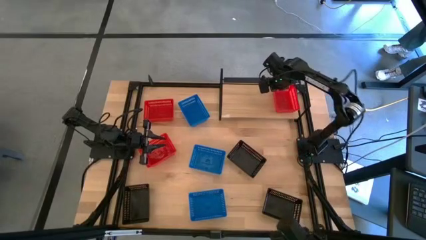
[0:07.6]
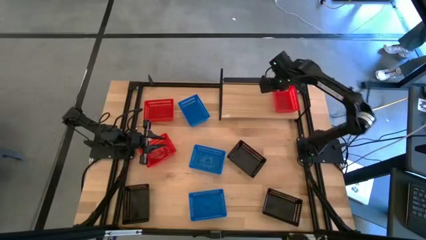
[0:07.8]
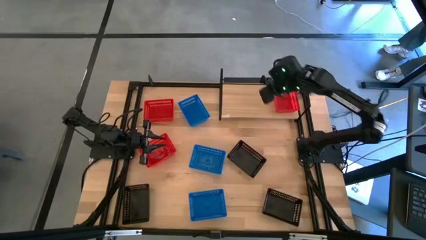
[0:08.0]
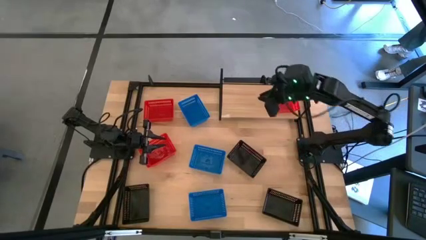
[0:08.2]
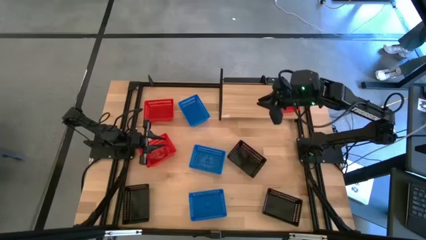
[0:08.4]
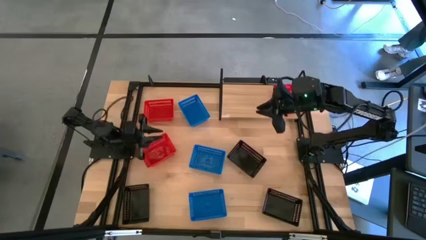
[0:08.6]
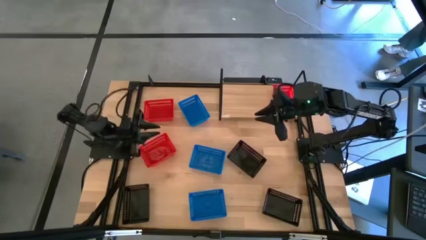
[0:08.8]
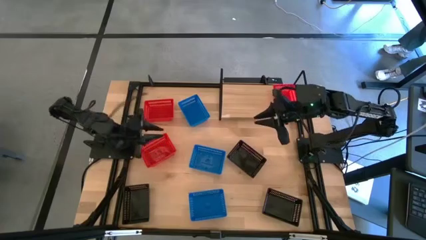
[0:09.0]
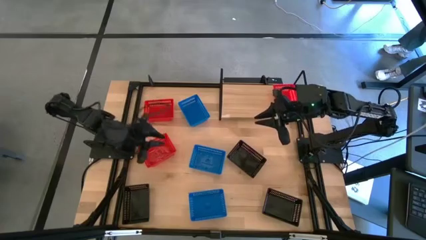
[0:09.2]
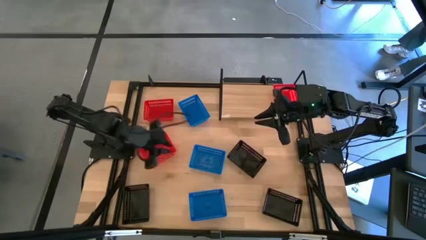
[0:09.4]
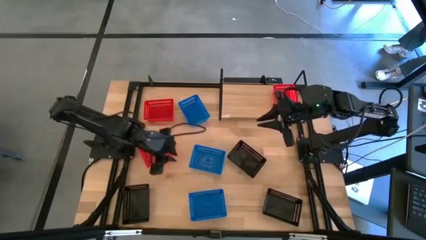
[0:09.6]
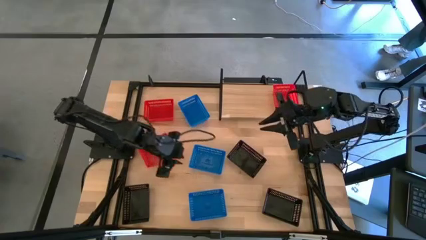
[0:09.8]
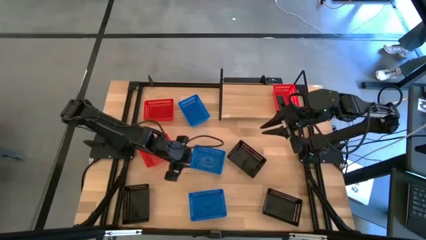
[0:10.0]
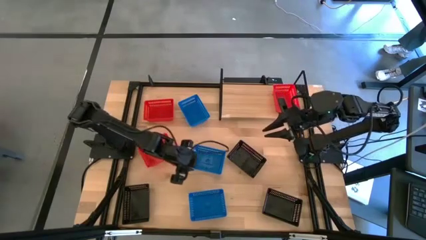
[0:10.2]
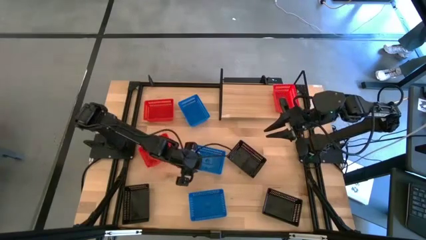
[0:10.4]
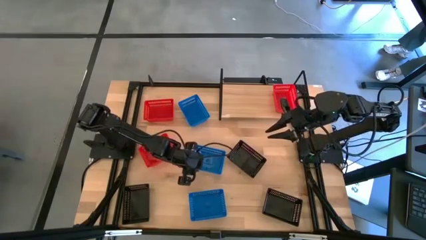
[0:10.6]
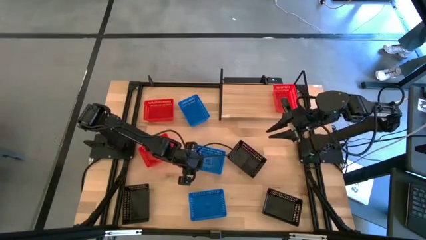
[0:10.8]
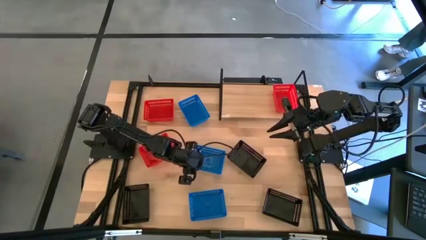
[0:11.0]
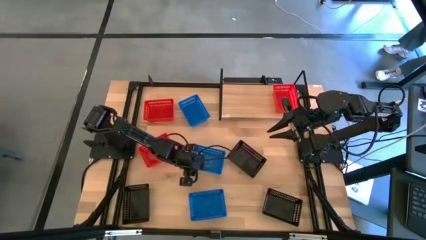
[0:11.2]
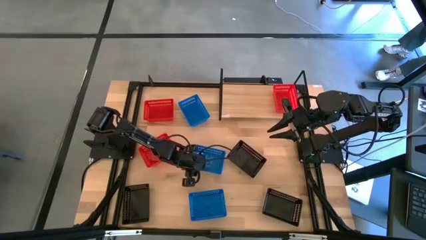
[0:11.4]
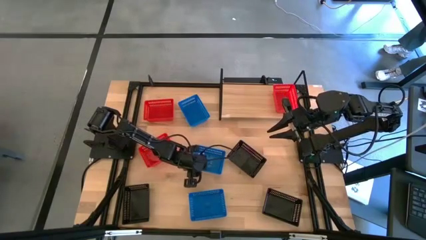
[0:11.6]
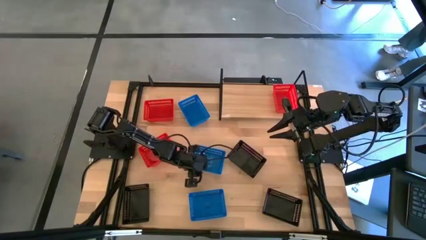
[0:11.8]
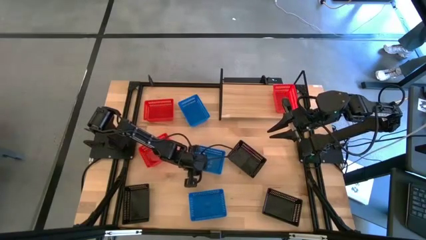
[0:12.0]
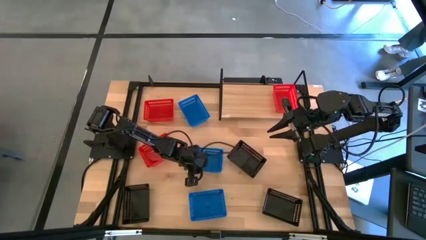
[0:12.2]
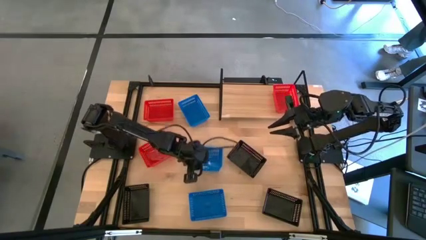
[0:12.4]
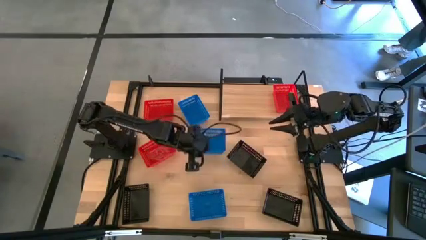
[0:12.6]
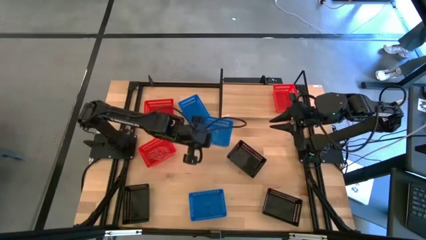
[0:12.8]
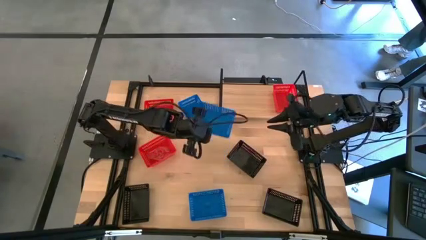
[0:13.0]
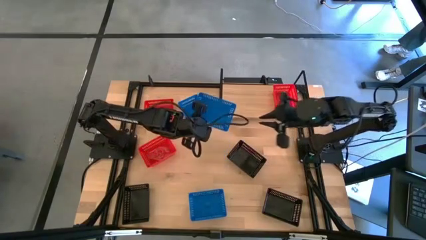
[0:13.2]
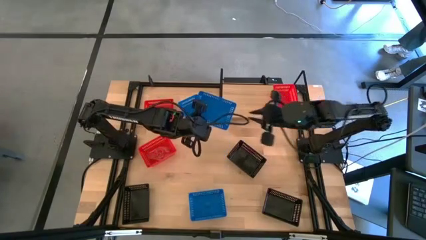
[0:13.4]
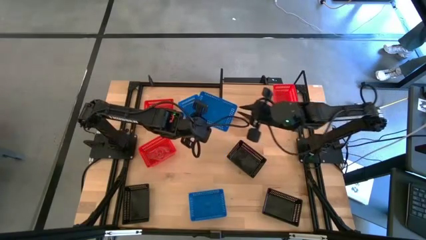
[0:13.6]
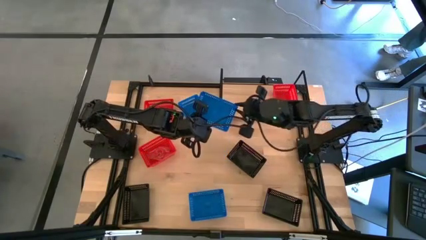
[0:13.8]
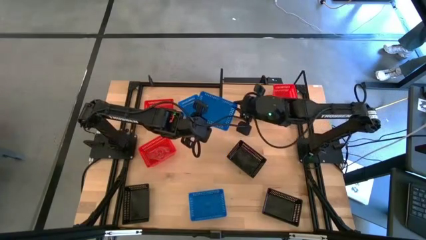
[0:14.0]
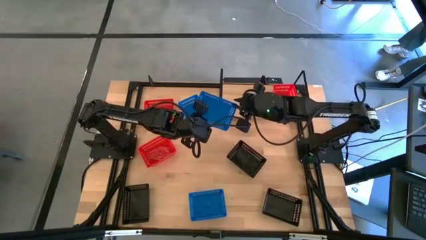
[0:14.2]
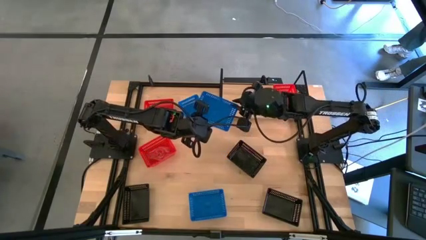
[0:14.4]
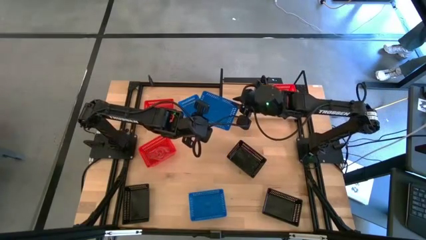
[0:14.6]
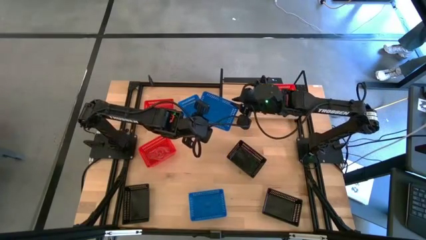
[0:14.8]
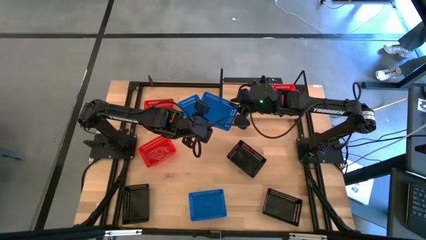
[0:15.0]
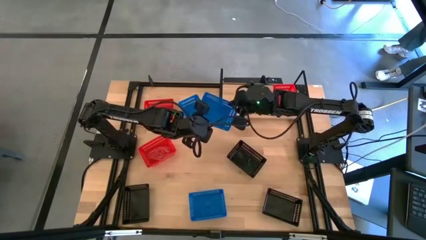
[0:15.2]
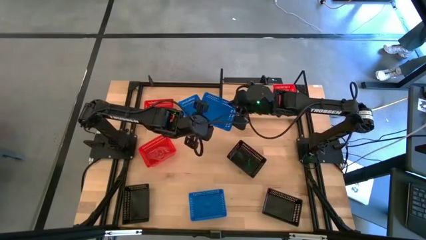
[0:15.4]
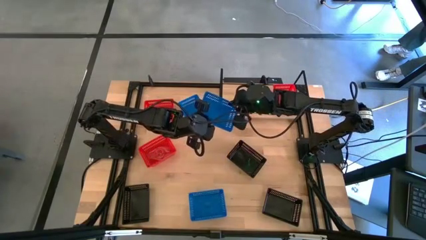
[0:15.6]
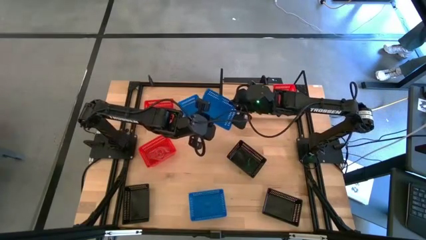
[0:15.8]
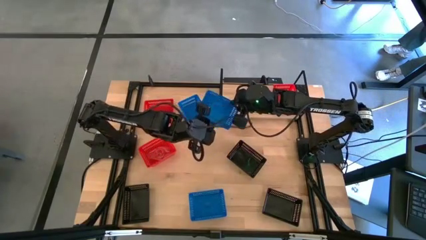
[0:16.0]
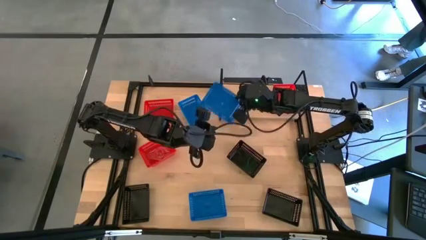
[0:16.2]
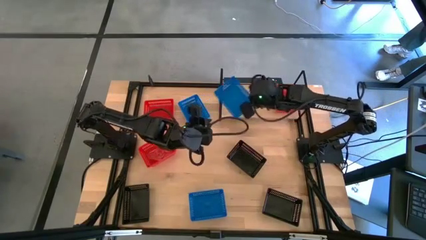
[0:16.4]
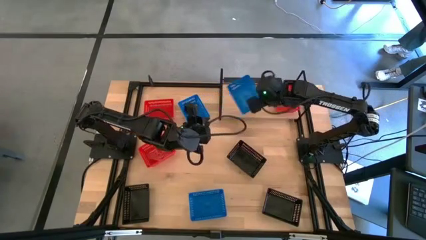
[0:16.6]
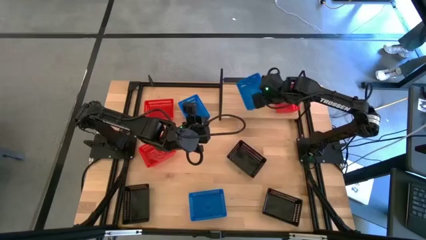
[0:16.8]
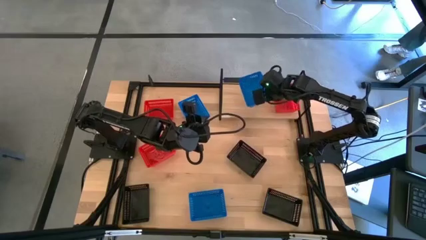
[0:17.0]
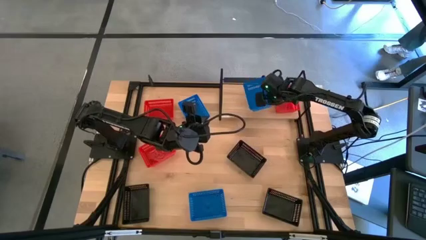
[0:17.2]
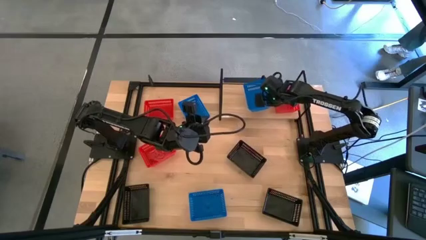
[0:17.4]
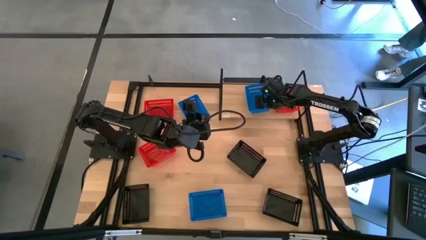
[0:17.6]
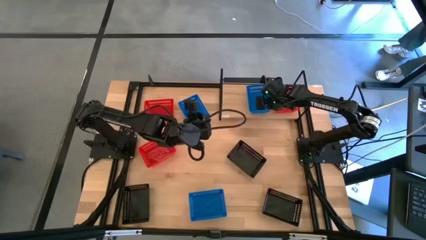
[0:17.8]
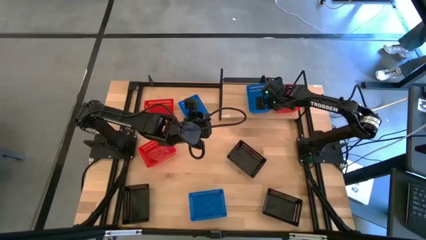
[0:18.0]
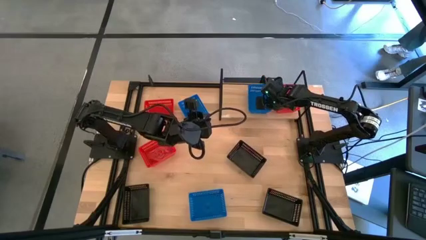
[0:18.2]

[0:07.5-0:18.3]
Task: Stack baskets on shelf by color
Put the middle blue bin on the shelf

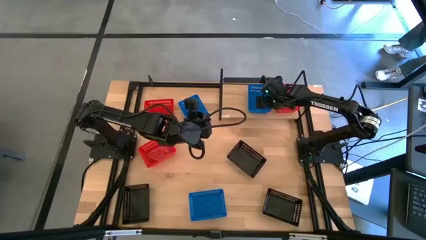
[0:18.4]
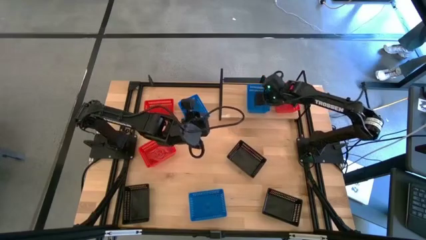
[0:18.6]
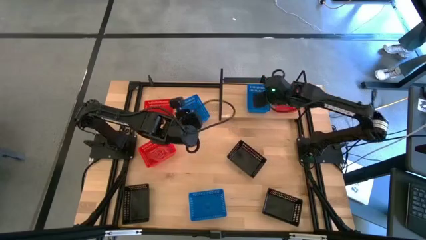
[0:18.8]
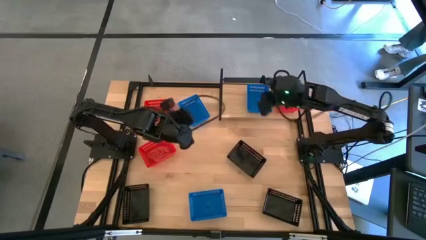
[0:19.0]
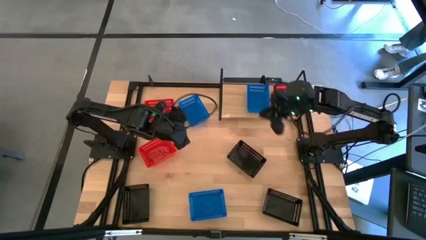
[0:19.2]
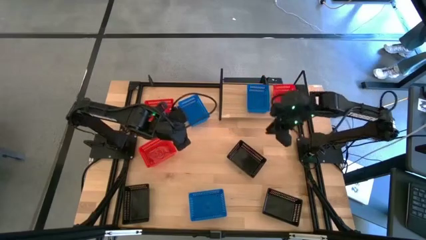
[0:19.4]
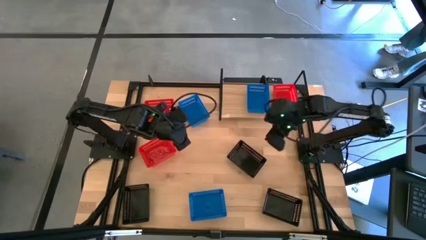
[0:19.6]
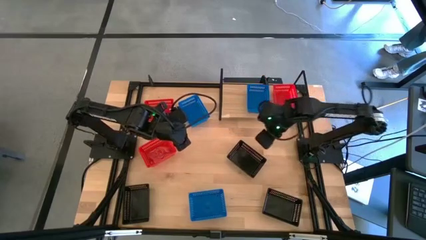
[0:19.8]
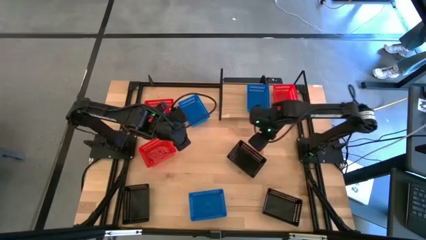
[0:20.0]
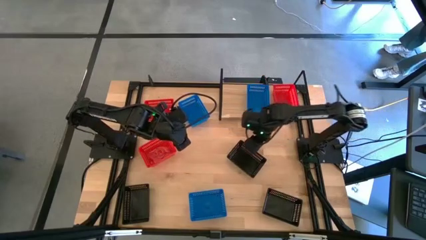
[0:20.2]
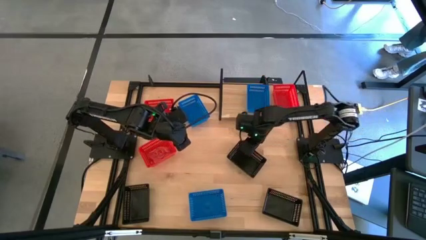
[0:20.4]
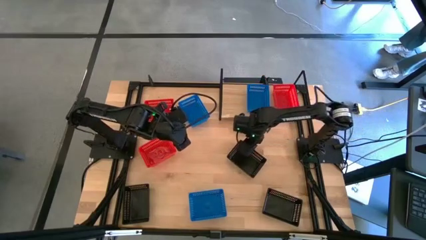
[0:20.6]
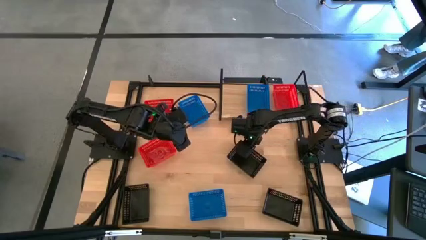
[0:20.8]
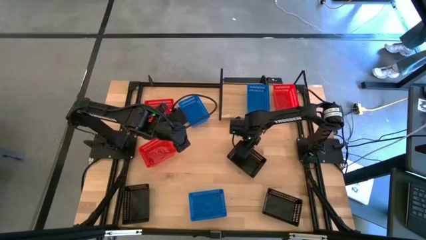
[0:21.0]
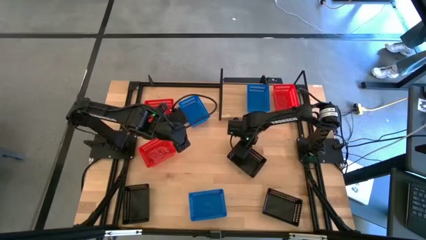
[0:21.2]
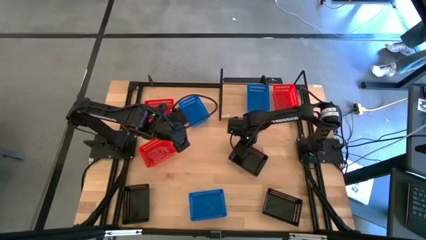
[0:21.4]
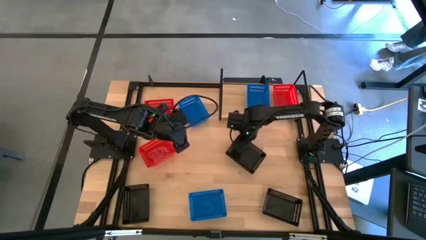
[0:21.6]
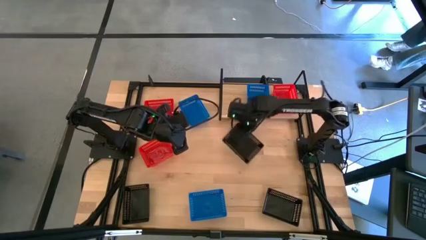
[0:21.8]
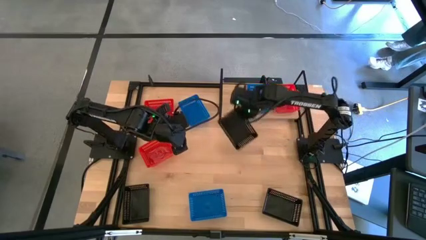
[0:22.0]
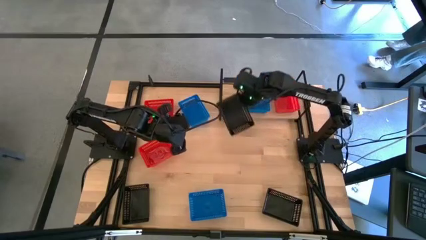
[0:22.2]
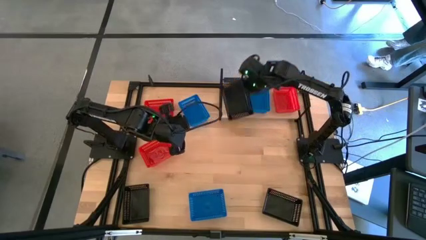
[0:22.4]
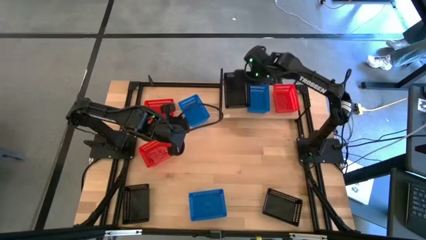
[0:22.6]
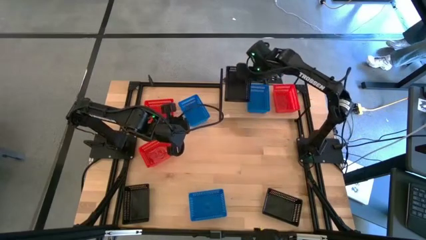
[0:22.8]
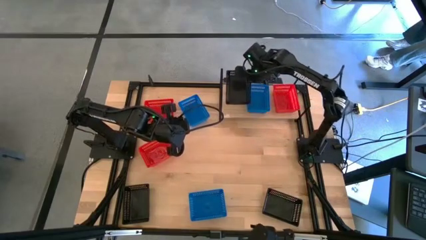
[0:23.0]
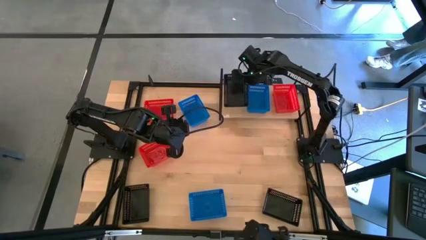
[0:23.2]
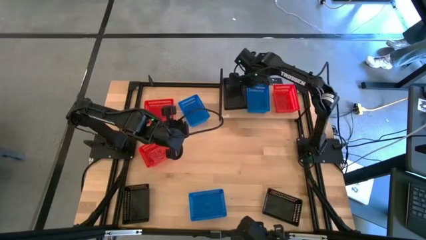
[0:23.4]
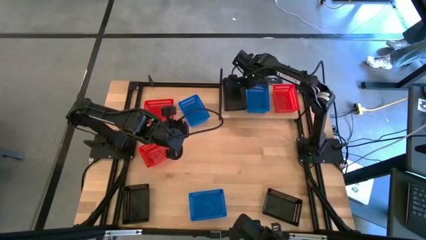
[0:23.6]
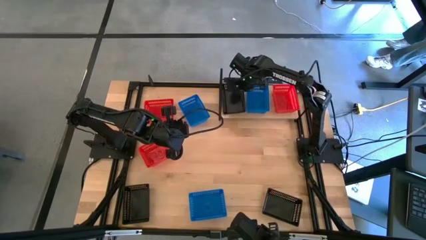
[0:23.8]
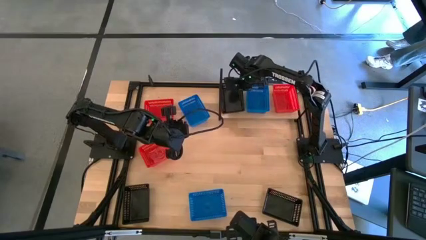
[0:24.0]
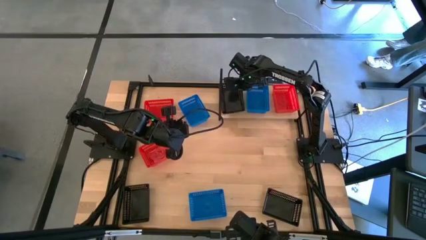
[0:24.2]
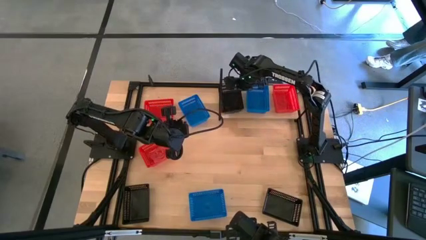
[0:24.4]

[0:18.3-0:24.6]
Put the top black bin on the shelf
